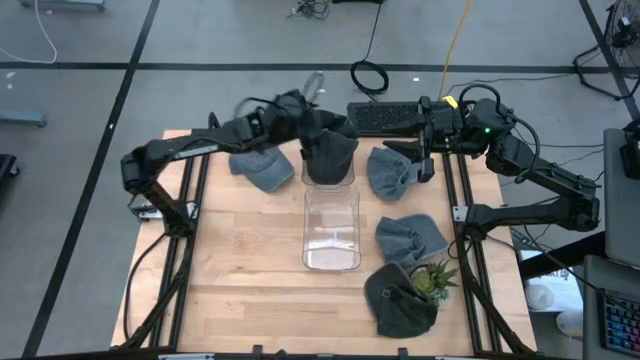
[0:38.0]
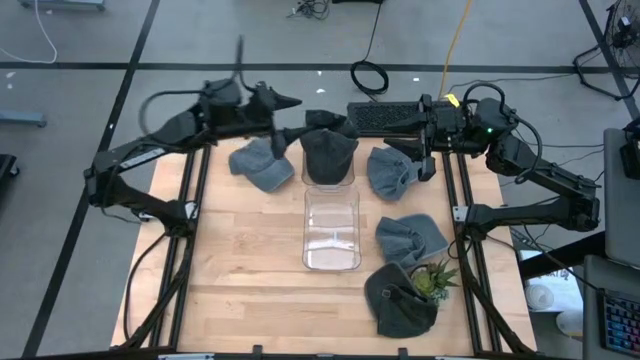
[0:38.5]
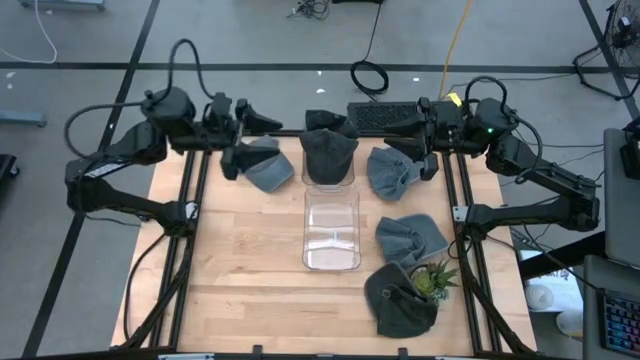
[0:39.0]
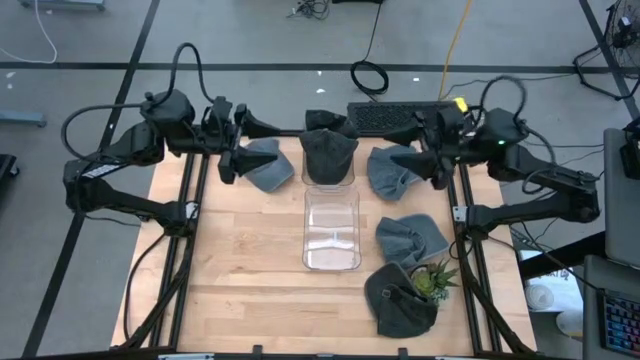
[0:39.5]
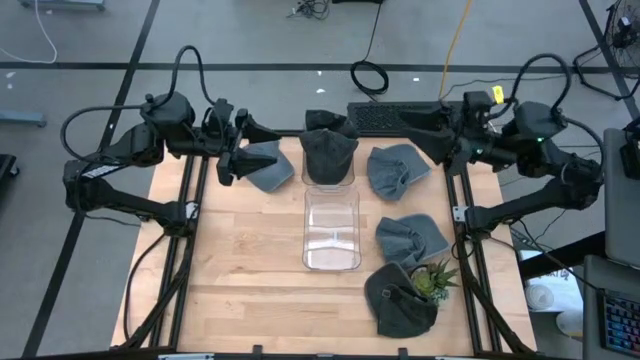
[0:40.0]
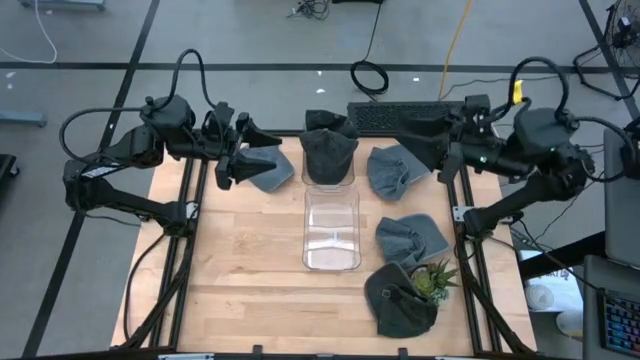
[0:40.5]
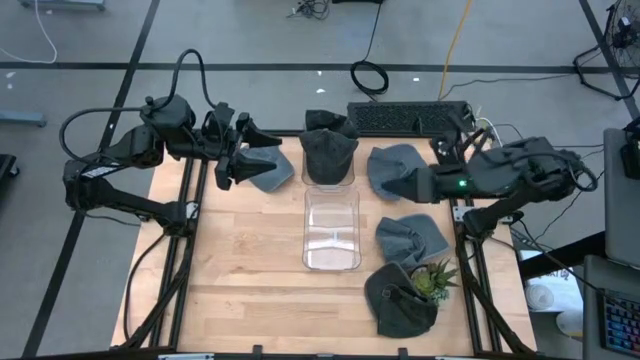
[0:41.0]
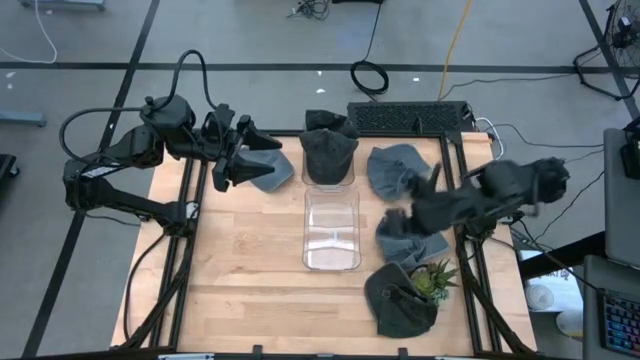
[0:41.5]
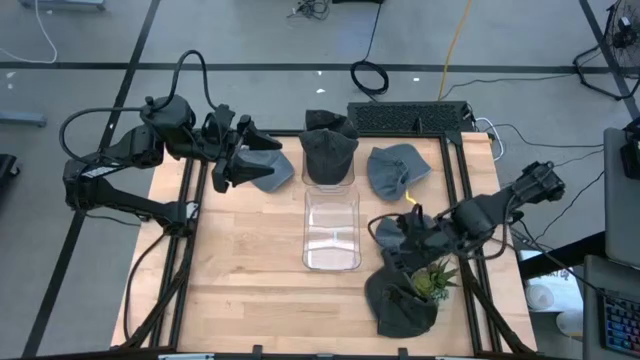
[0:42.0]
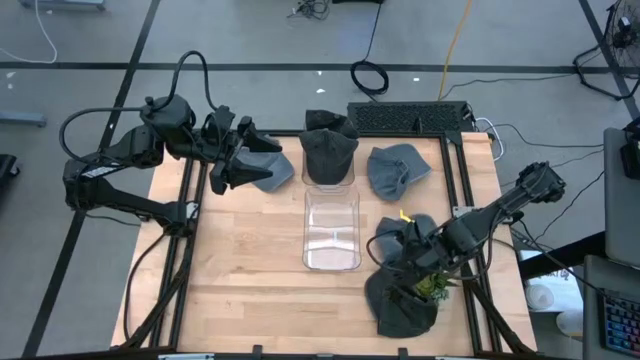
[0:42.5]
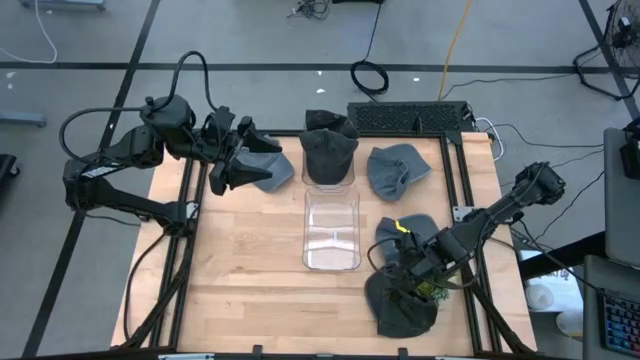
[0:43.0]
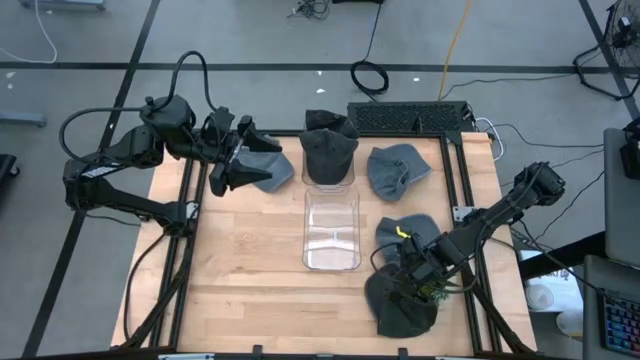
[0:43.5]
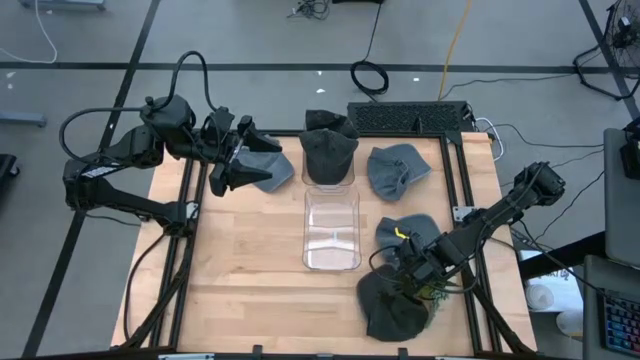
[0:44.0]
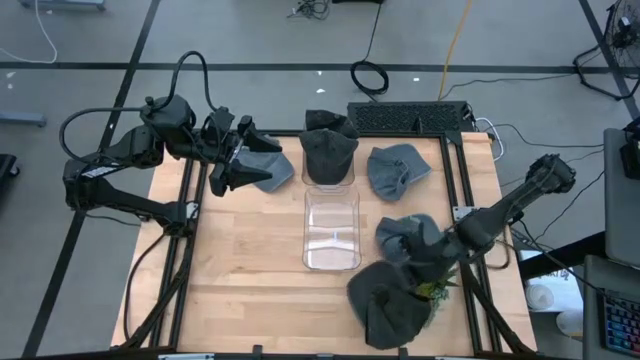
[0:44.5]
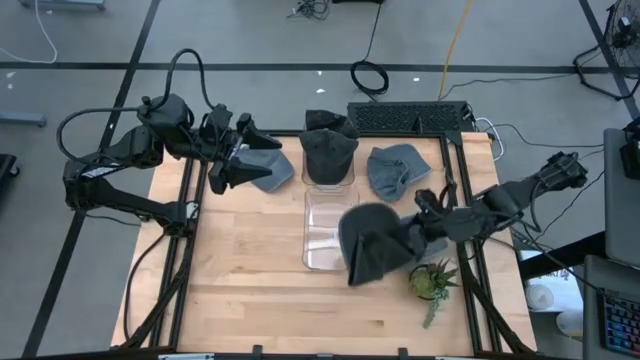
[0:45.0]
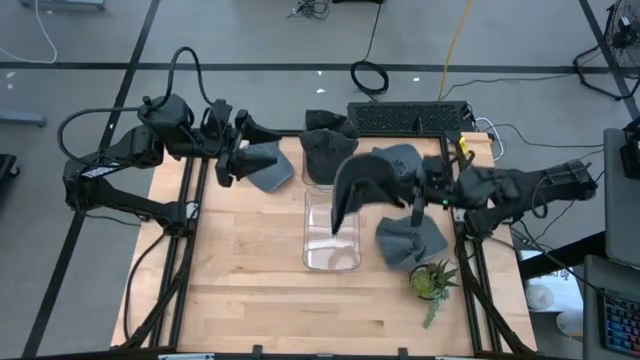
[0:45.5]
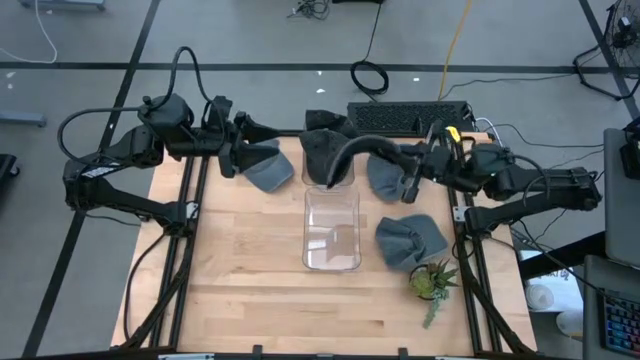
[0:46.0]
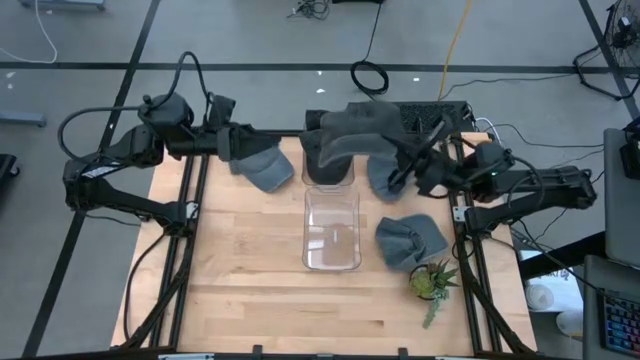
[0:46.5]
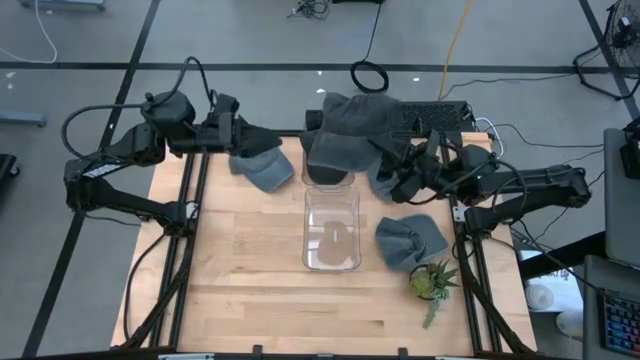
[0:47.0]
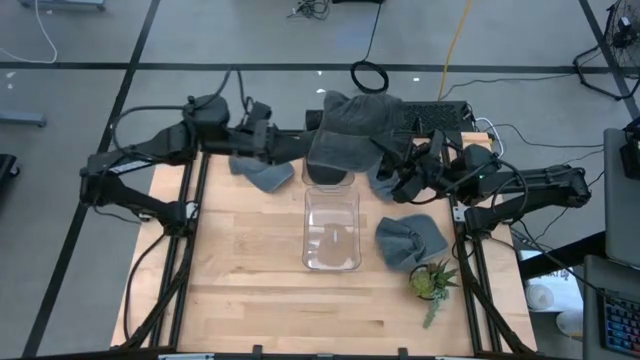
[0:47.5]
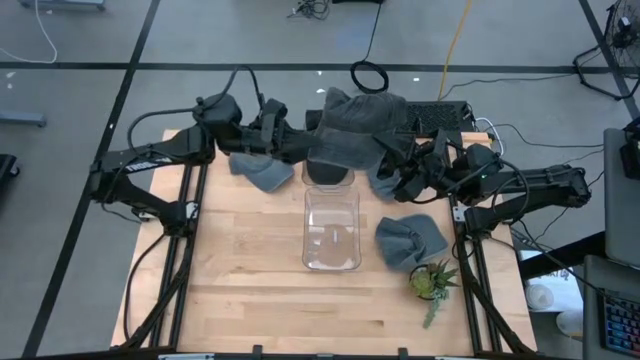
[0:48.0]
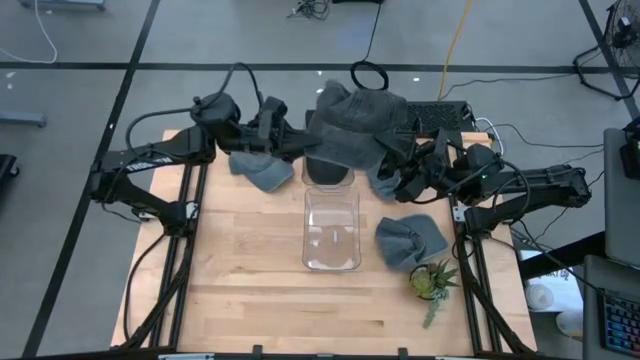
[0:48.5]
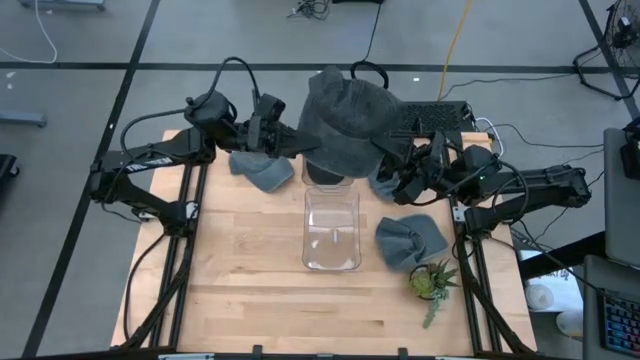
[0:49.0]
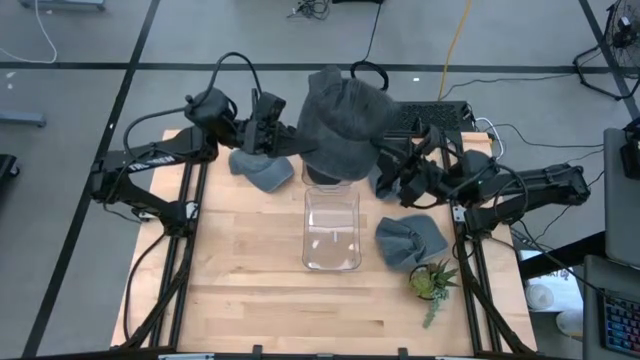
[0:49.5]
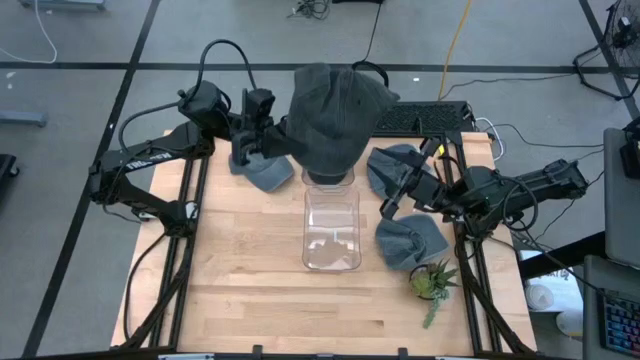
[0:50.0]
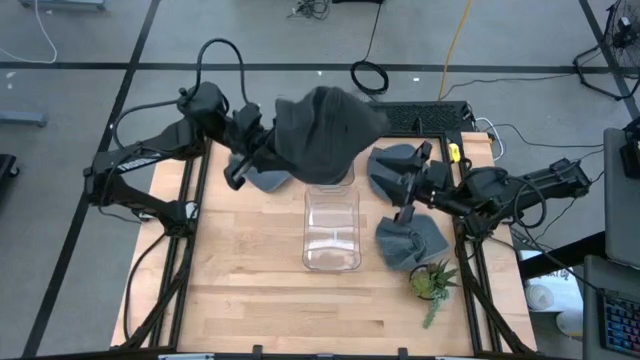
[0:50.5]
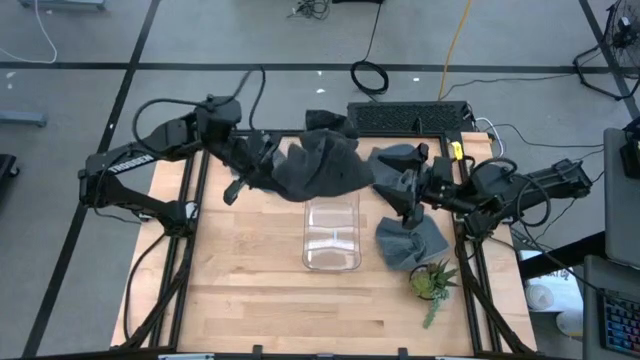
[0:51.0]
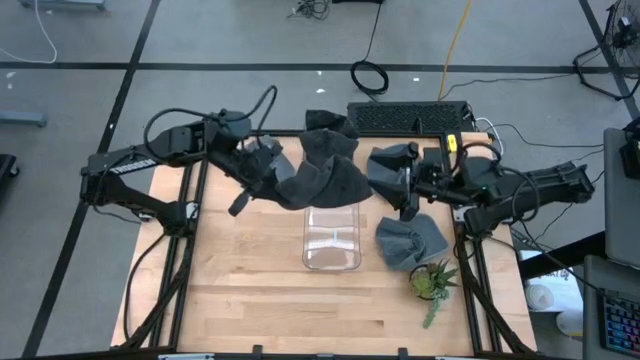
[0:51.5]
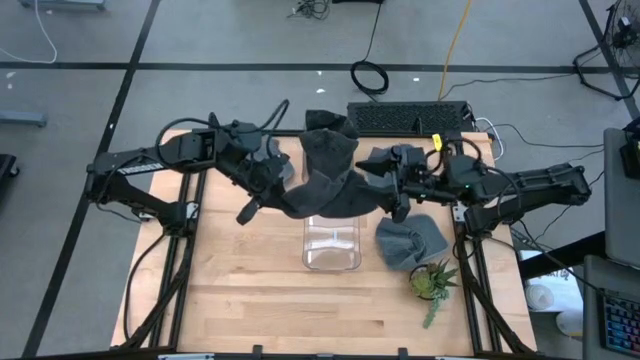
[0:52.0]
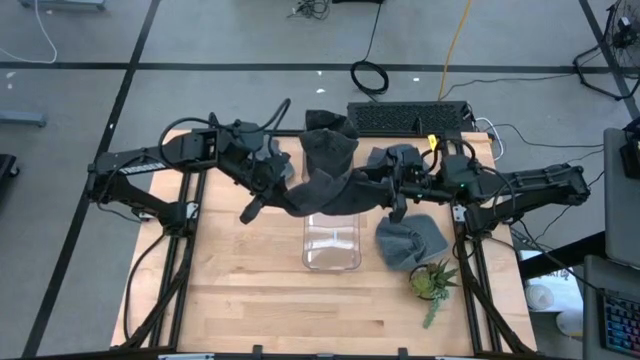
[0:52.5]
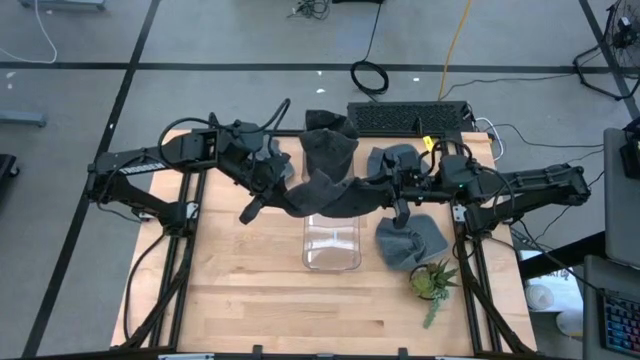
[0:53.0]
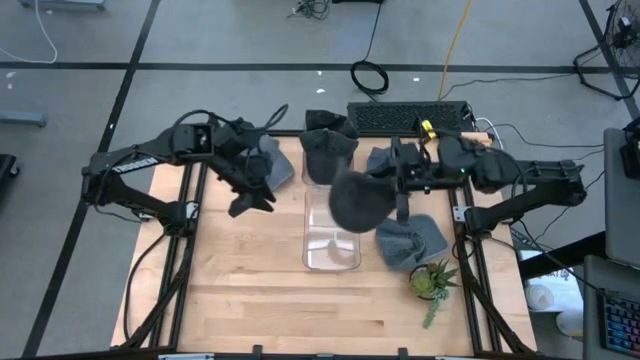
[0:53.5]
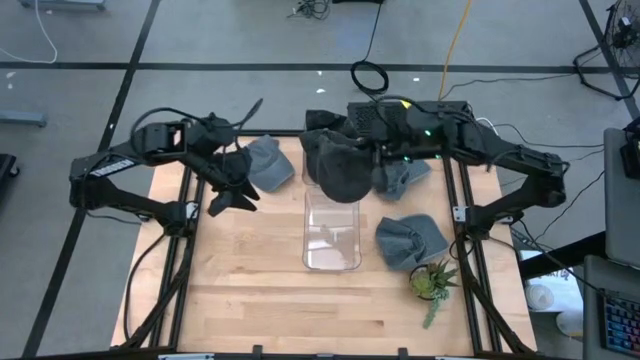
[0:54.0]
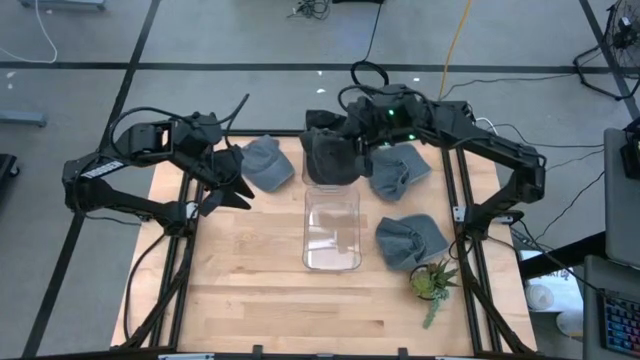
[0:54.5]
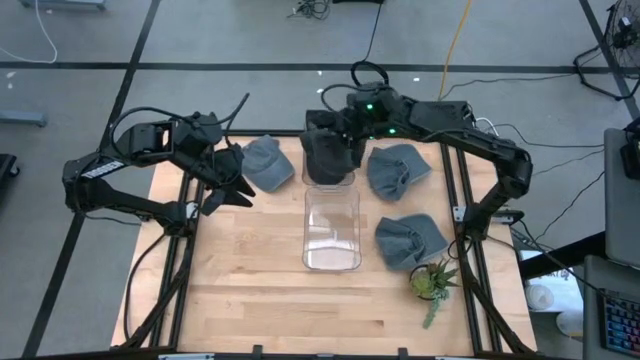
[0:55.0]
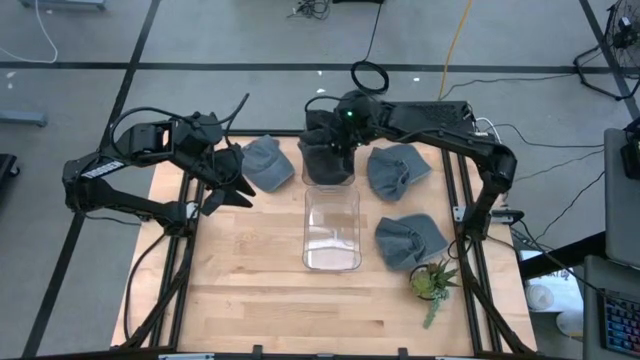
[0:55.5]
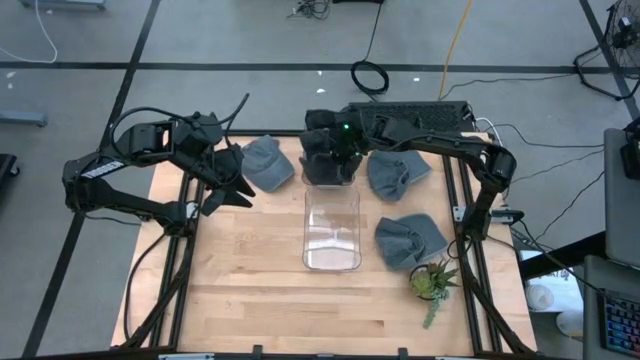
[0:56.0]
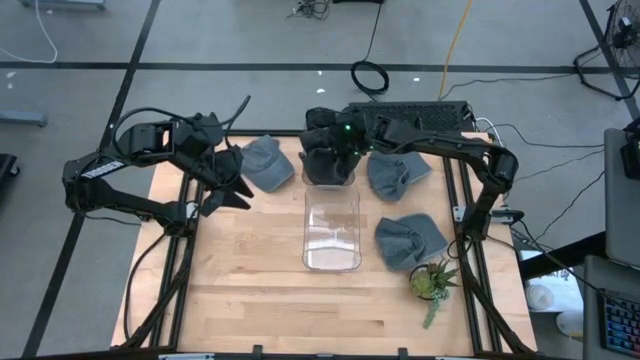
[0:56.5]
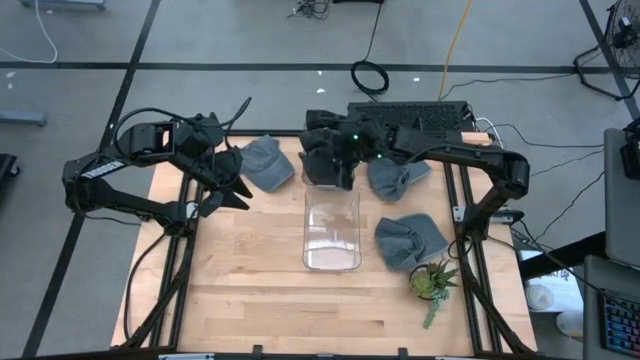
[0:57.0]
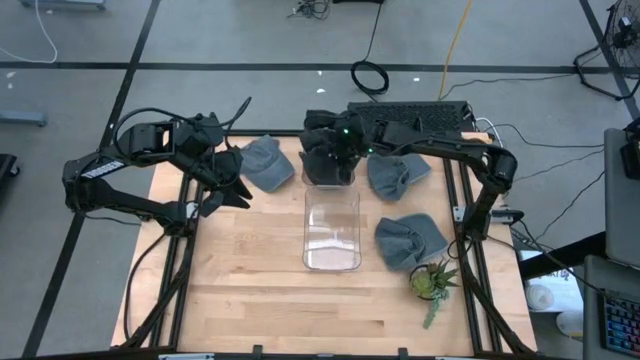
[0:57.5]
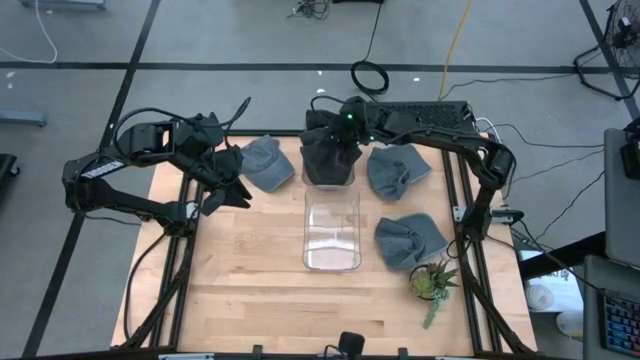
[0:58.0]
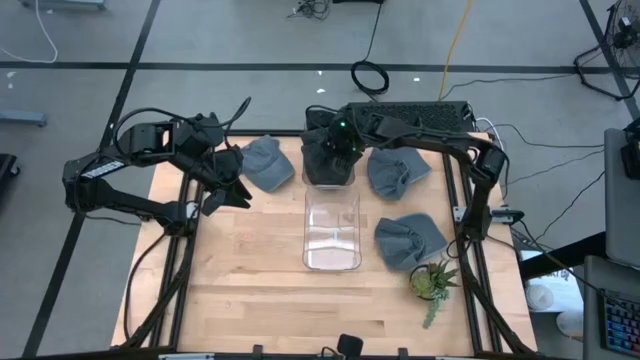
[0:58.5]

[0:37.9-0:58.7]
Task: Pick & Place hat
Put the black cap into the top transparent bin
